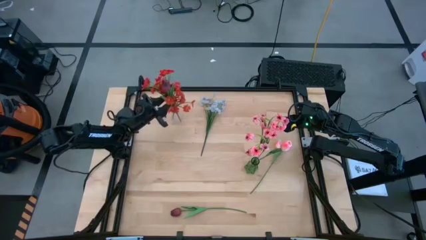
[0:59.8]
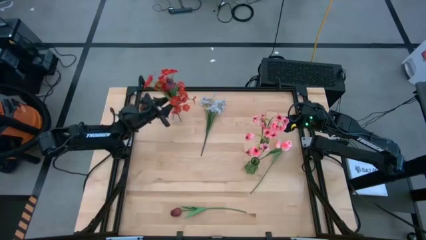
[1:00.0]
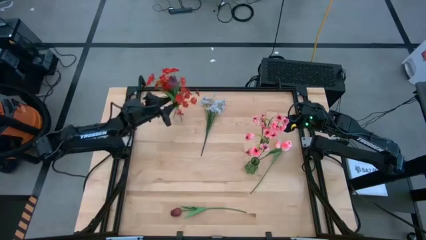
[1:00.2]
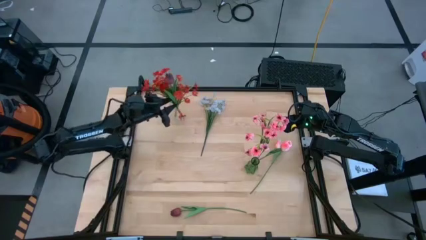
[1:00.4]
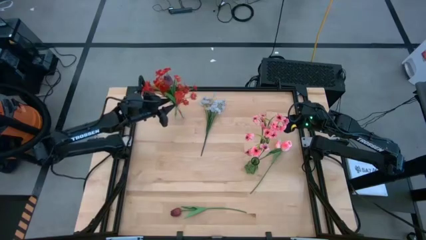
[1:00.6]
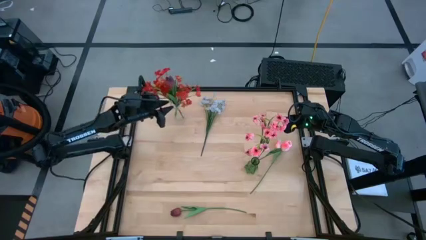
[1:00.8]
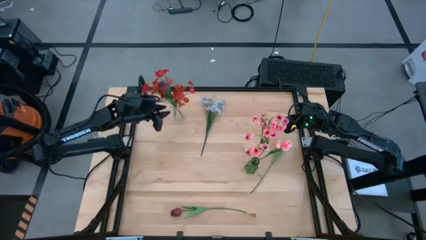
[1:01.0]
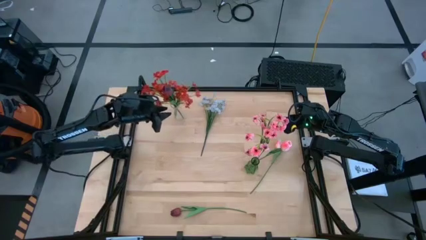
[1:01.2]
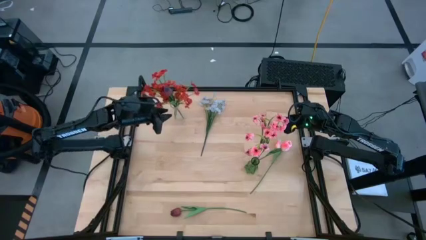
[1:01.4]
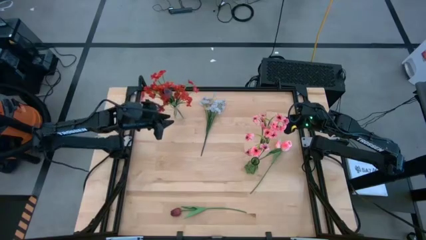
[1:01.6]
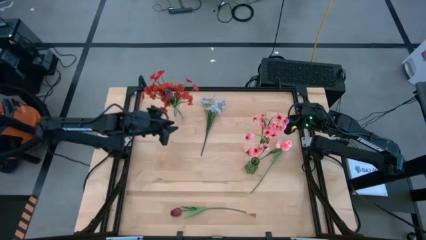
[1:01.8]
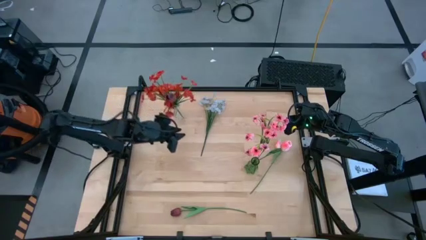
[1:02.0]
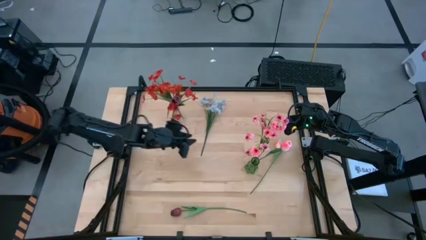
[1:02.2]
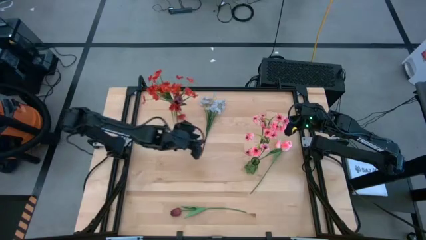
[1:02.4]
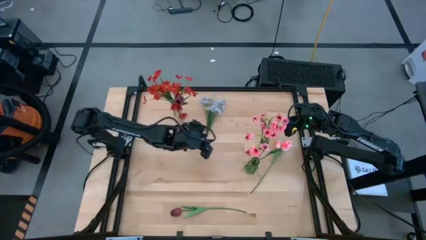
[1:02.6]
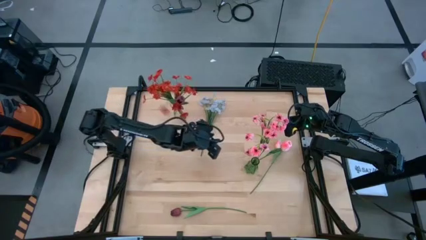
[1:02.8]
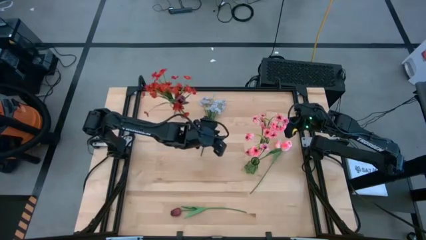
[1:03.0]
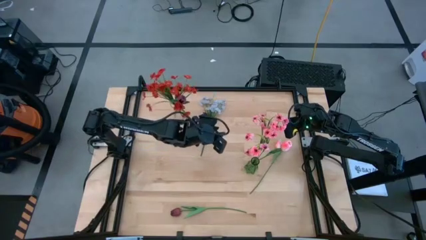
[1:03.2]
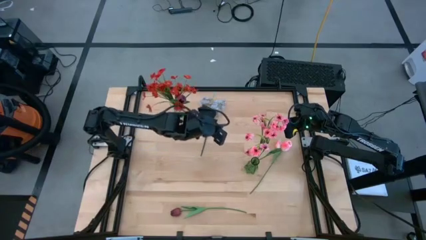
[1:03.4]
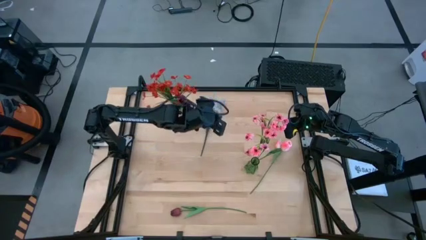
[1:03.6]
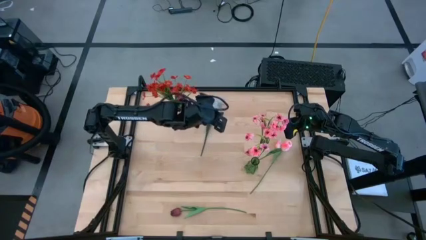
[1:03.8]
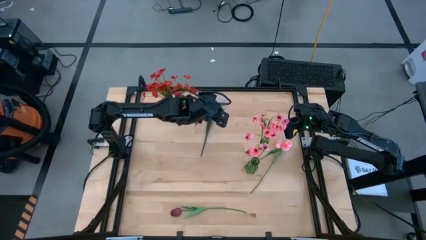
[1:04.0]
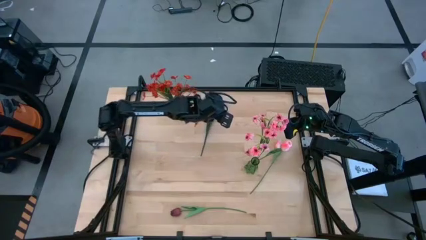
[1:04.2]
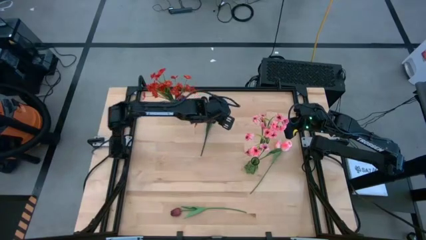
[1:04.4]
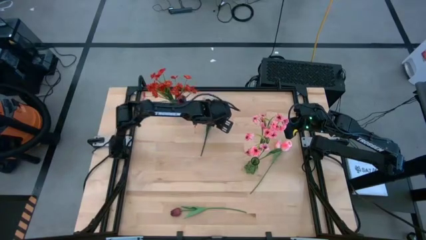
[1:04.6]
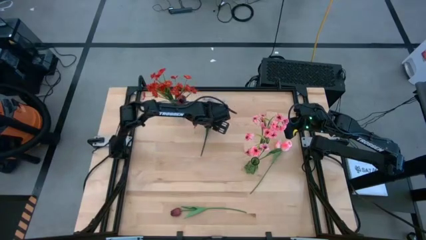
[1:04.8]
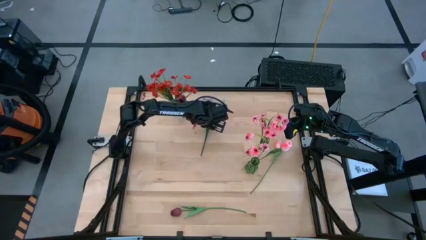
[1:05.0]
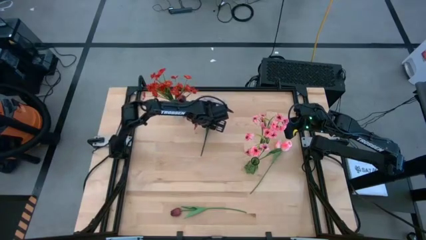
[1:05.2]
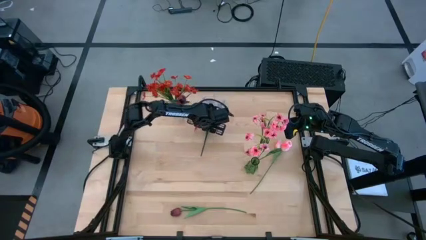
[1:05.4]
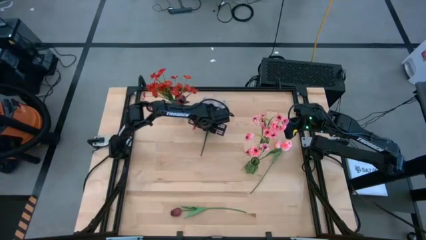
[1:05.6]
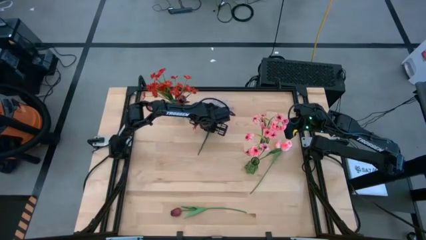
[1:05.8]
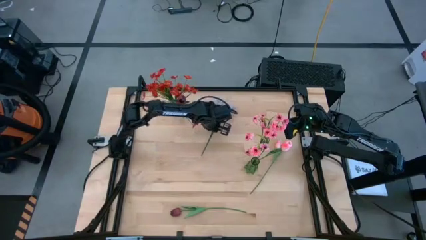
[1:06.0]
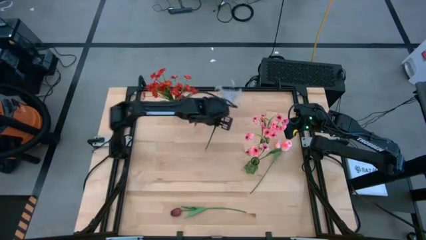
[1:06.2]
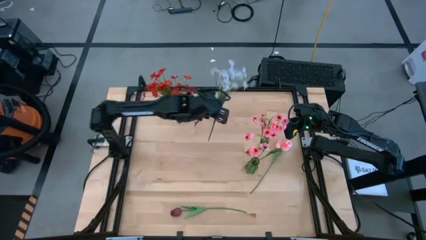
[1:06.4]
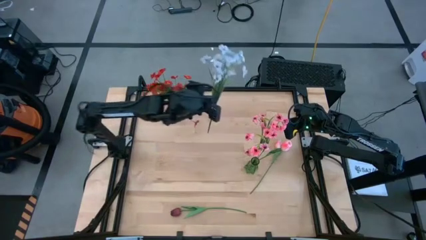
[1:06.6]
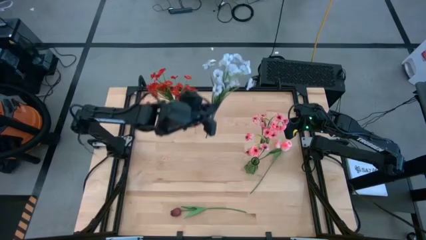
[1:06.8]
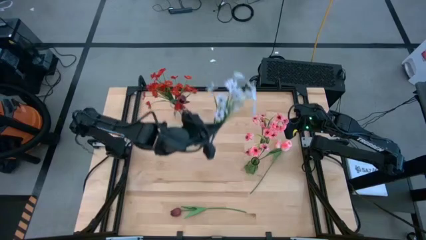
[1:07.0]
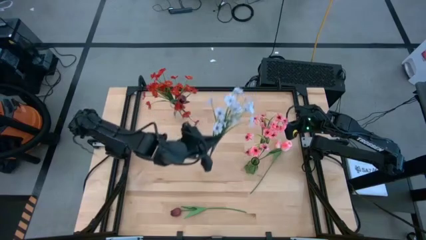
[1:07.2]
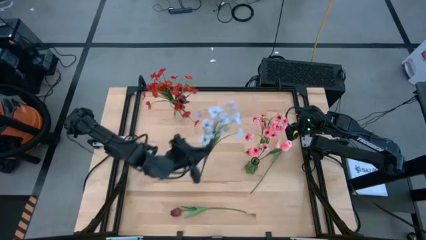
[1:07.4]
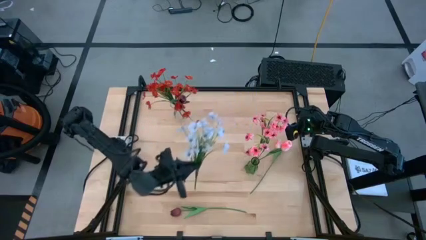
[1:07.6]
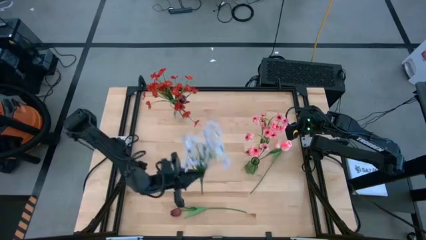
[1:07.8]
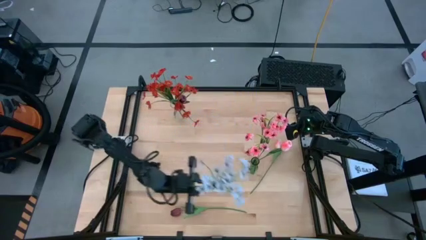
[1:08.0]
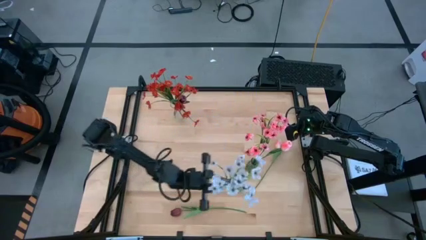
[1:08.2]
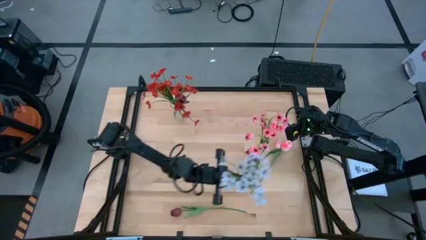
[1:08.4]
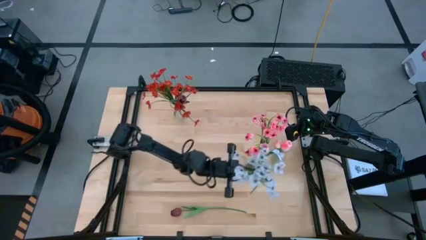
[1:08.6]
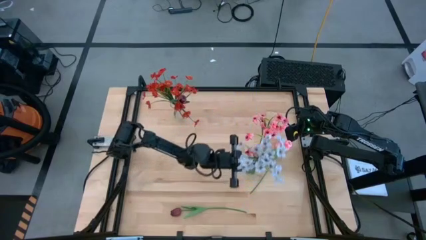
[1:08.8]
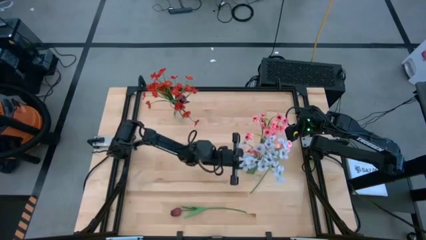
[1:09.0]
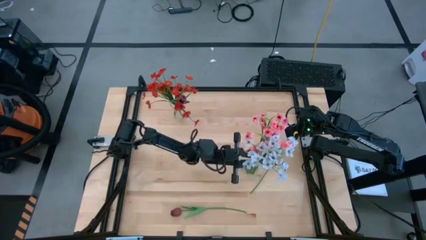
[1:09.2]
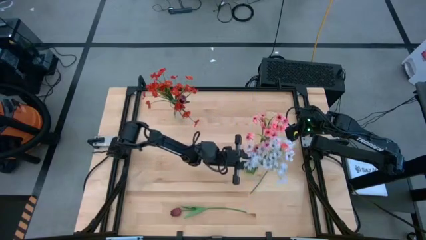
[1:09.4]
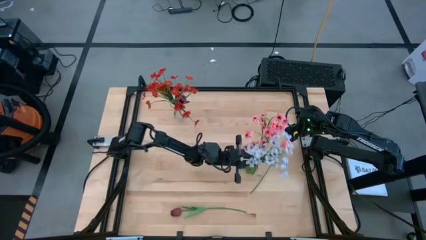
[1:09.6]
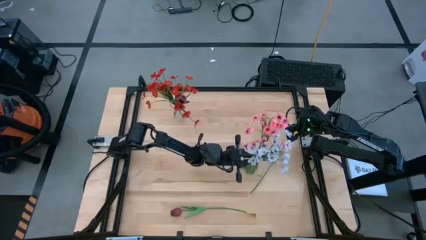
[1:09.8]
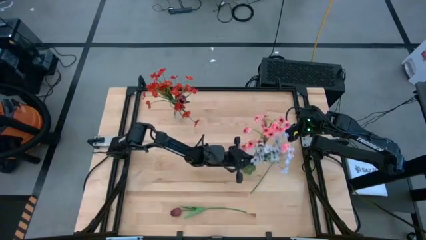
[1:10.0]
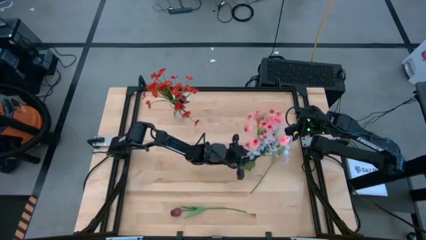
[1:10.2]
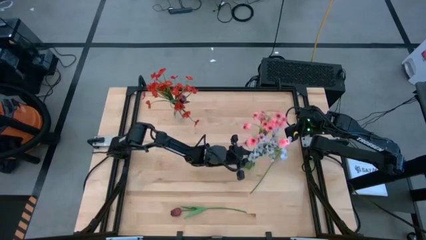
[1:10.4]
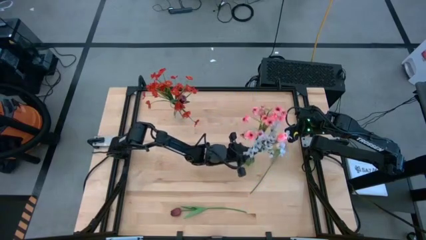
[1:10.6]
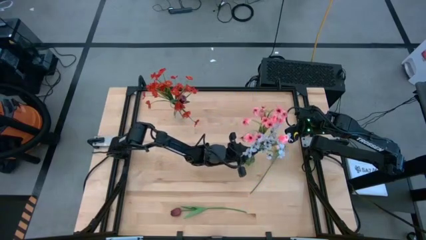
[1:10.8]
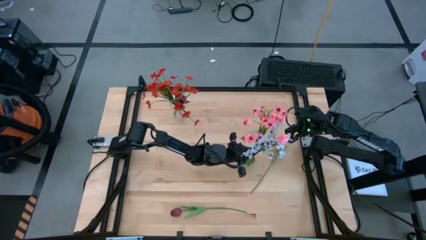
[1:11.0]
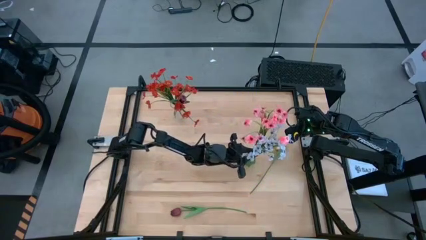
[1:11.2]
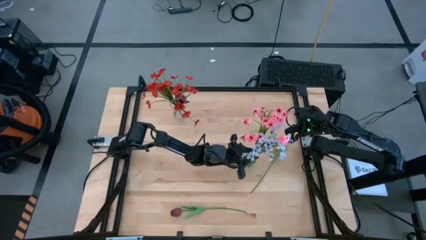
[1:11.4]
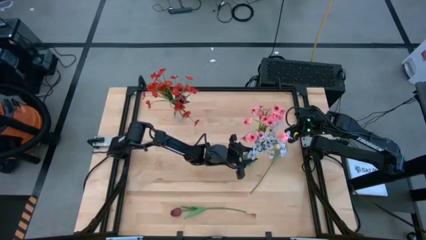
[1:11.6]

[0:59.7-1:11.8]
Task: Sort flowers into vase by color
Put the white flowers into the green vase

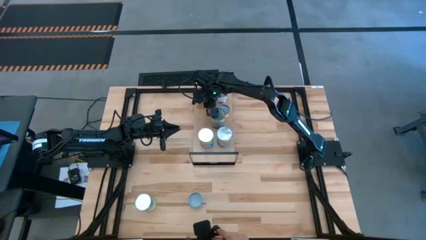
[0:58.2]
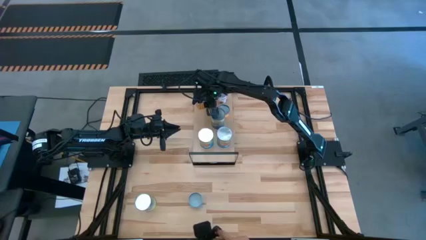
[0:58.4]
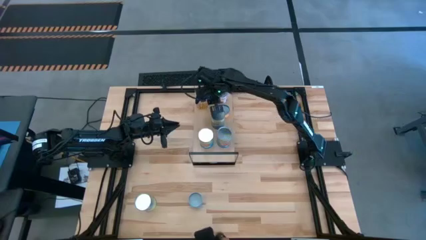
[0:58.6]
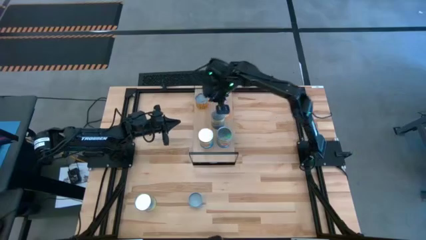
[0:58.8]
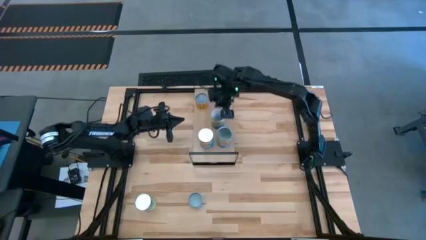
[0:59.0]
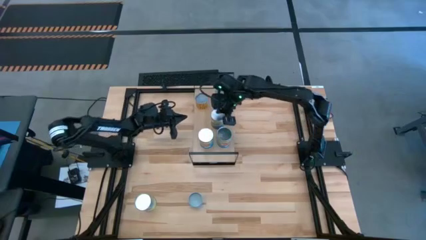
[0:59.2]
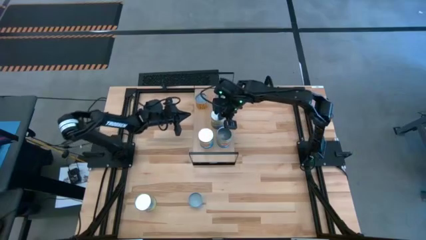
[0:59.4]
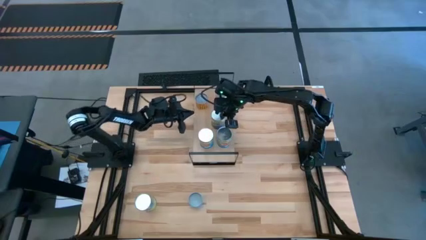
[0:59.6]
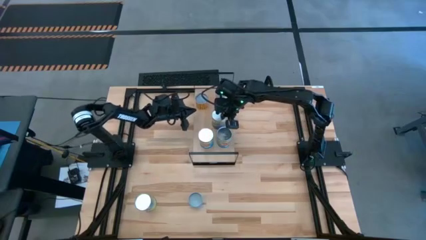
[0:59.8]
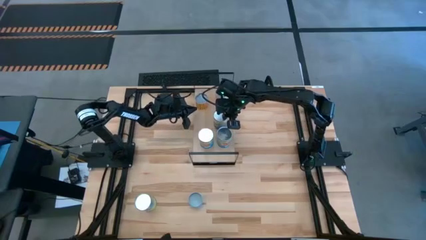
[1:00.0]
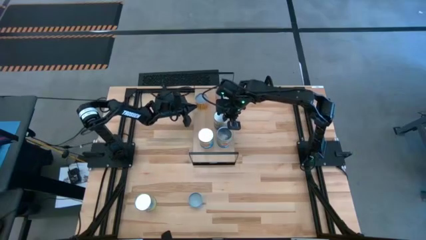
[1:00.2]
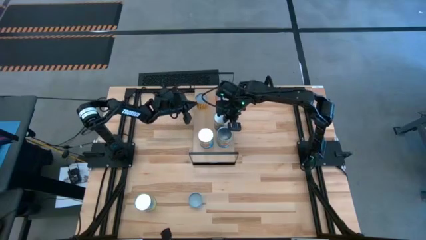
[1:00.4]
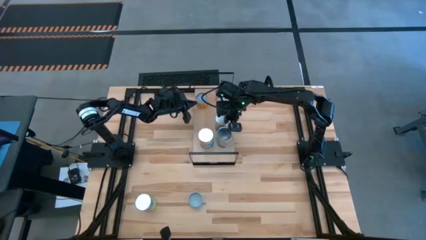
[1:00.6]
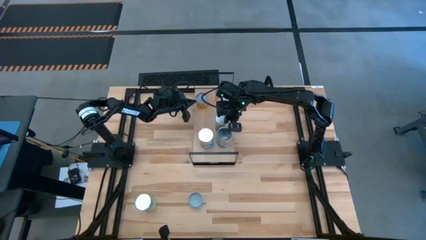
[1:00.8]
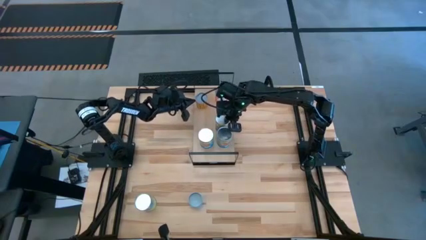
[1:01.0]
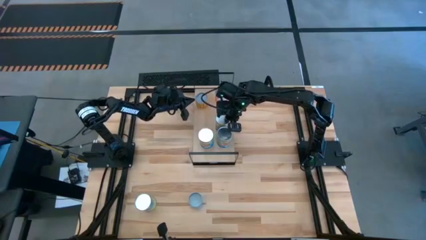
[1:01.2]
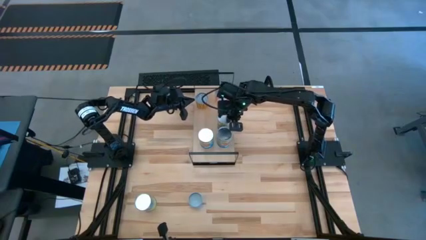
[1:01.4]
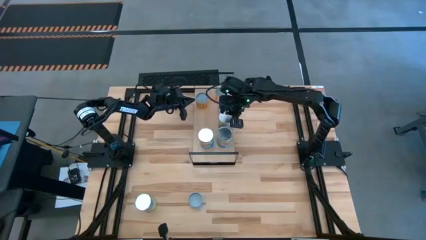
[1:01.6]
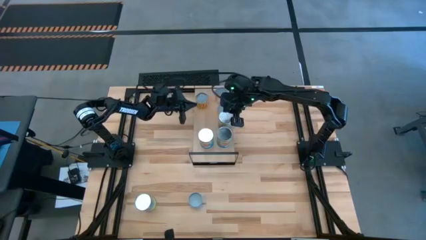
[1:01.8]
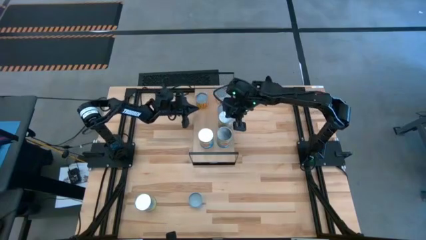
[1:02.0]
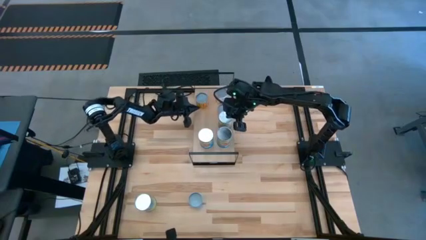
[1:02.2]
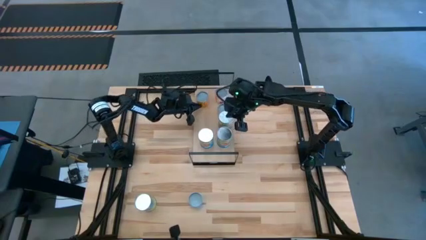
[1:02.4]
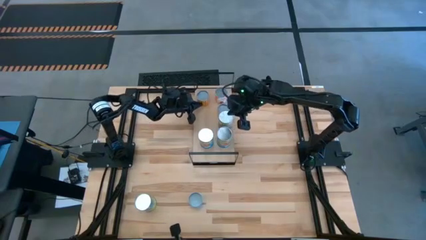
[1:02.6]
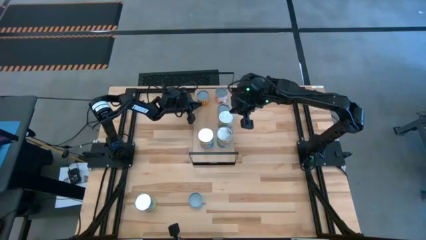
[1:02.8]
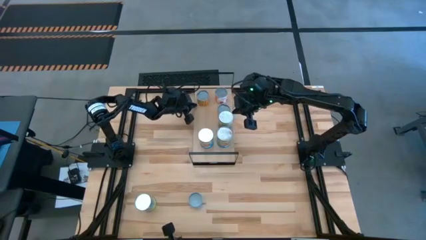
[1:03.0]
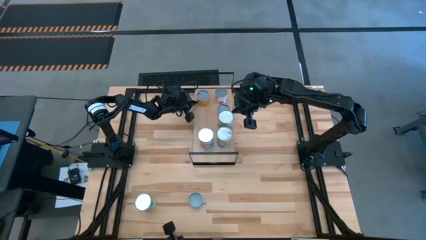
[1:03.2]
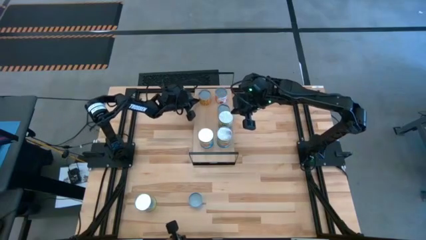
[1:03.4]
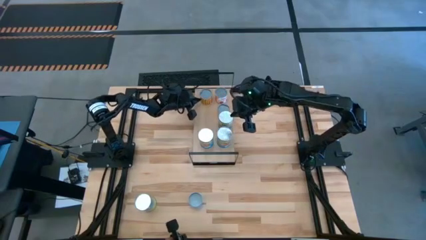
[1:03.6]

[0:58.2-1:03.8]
Task: Pick and place cans onto a shelf
Adjust the cans on the shelf
